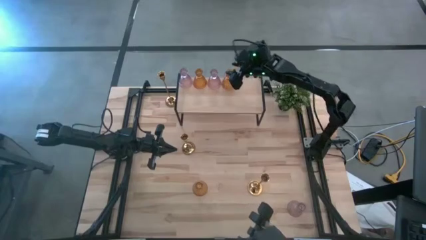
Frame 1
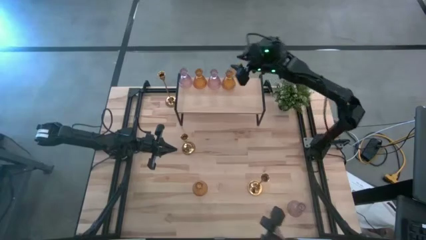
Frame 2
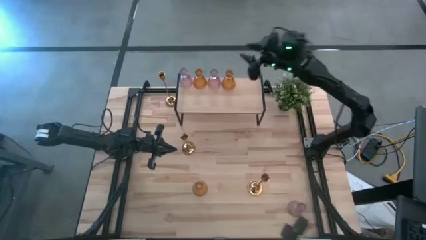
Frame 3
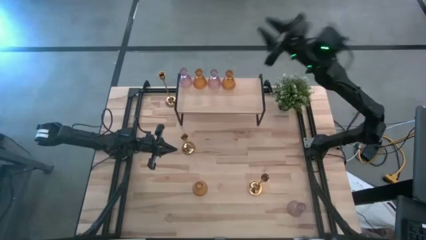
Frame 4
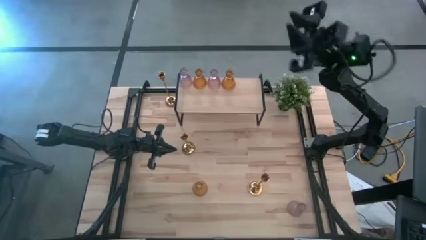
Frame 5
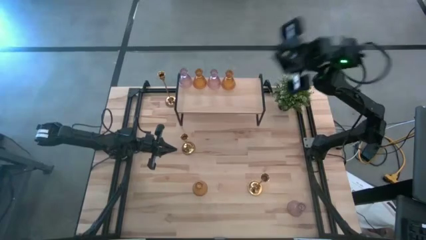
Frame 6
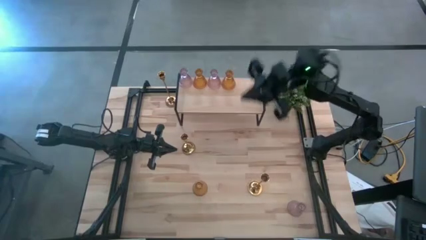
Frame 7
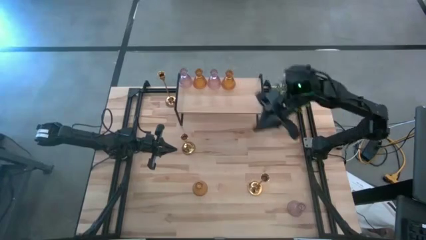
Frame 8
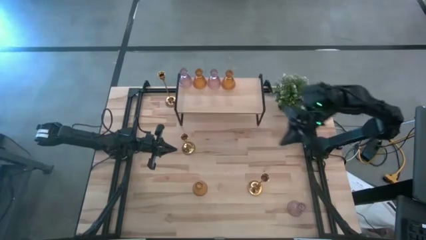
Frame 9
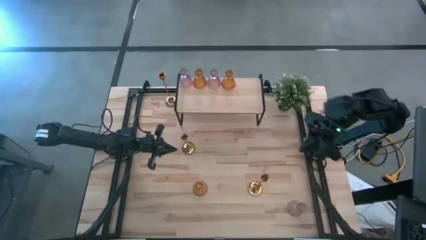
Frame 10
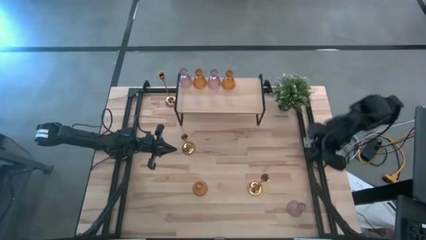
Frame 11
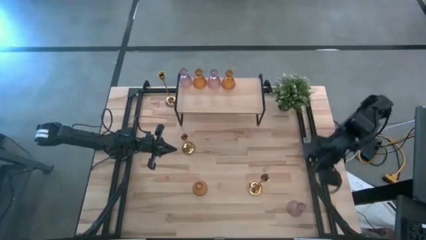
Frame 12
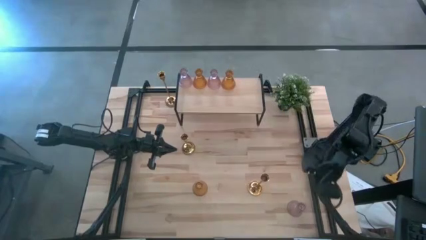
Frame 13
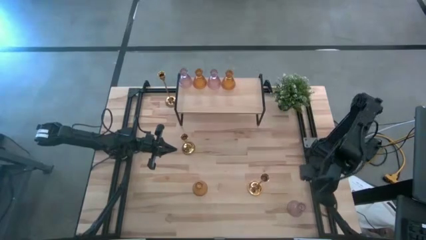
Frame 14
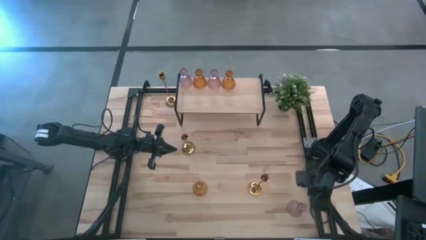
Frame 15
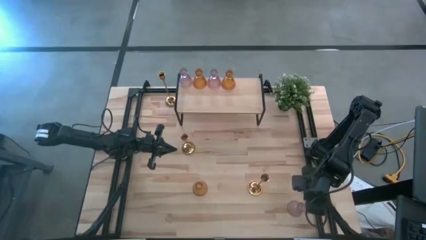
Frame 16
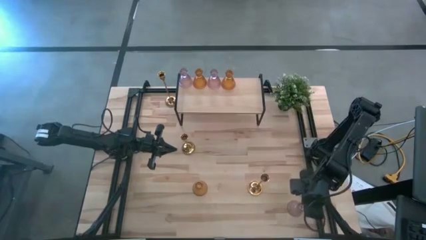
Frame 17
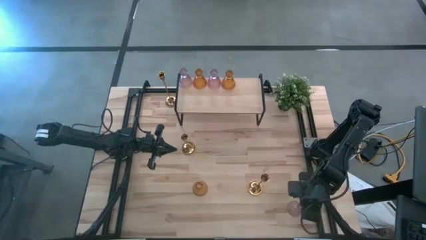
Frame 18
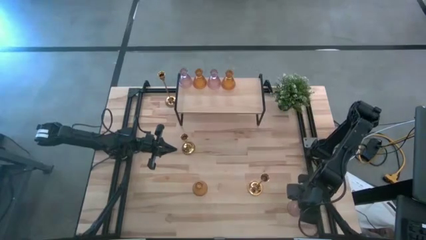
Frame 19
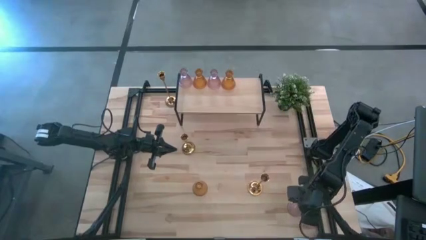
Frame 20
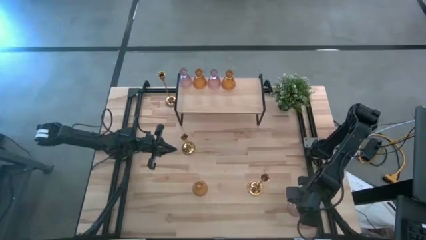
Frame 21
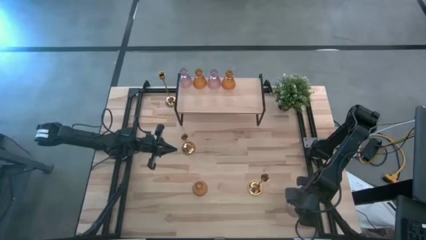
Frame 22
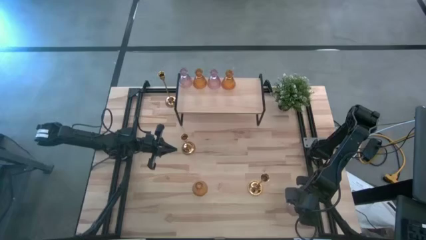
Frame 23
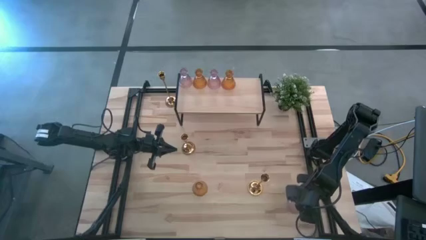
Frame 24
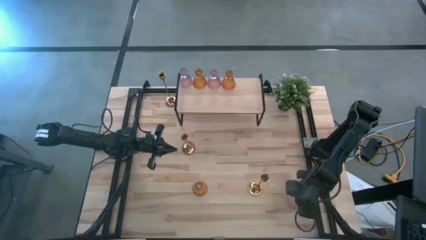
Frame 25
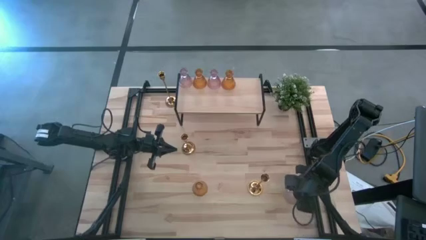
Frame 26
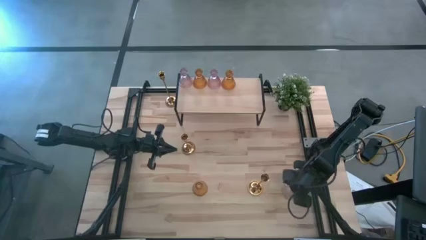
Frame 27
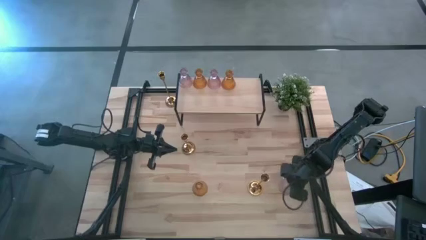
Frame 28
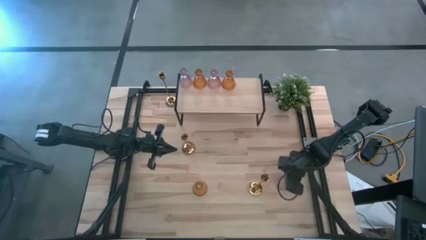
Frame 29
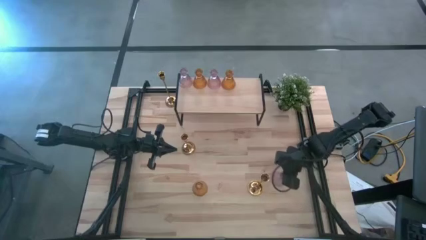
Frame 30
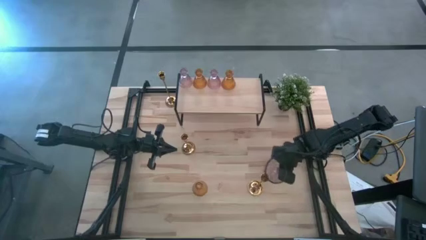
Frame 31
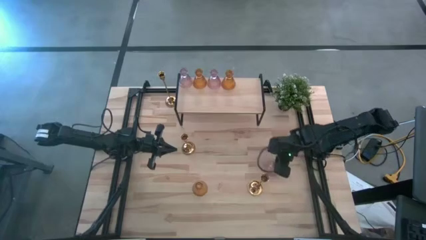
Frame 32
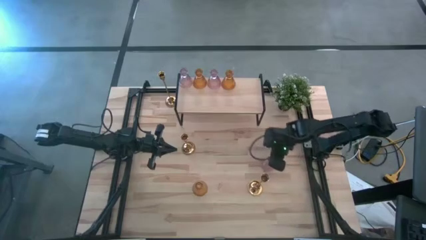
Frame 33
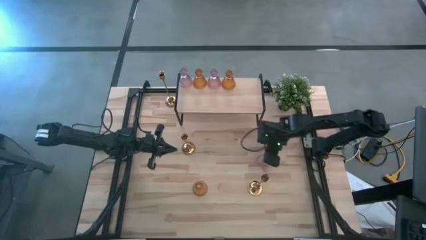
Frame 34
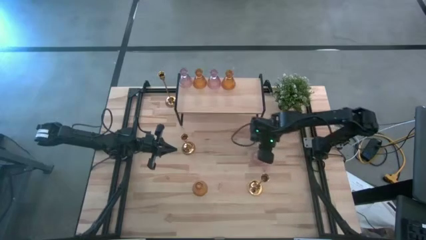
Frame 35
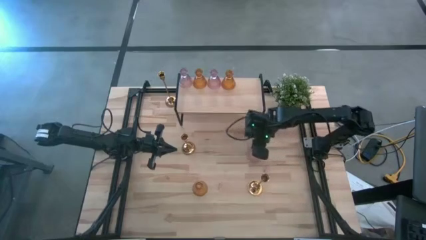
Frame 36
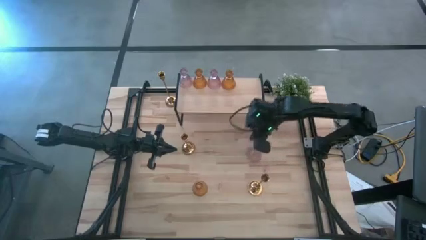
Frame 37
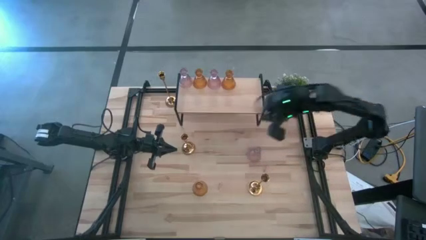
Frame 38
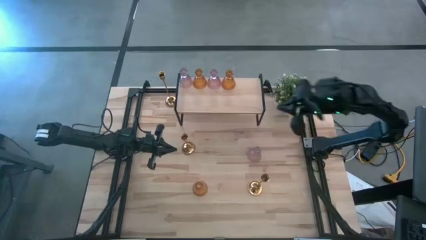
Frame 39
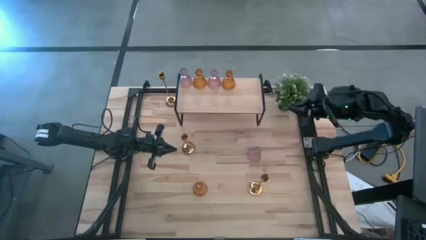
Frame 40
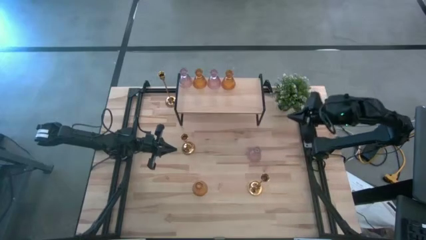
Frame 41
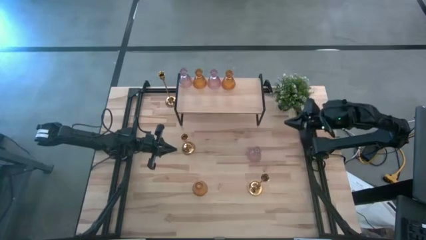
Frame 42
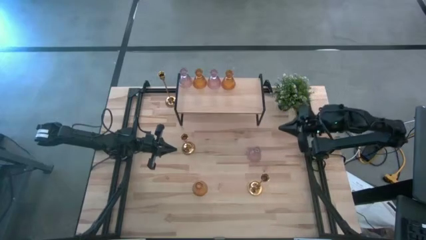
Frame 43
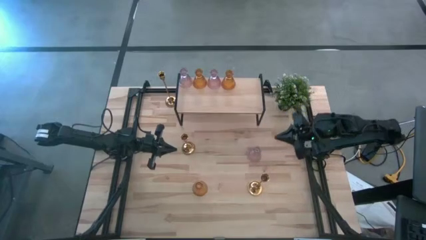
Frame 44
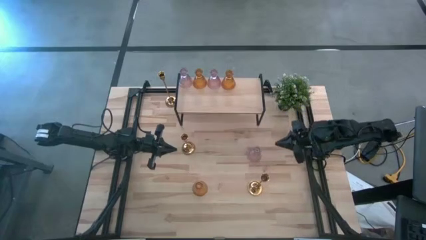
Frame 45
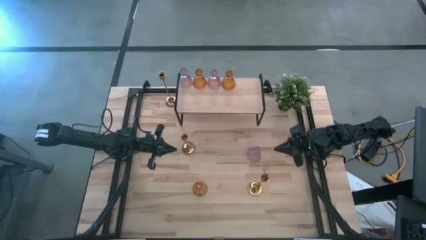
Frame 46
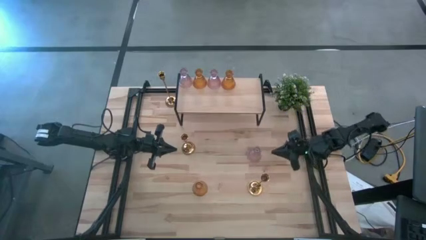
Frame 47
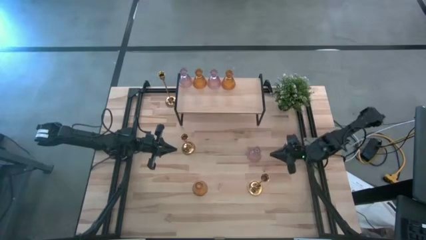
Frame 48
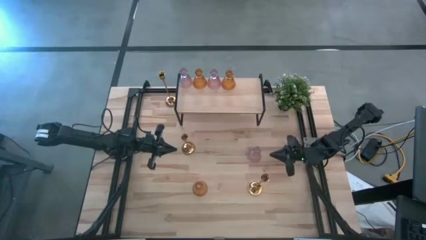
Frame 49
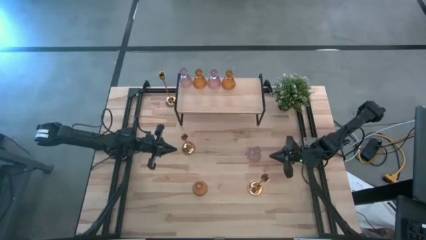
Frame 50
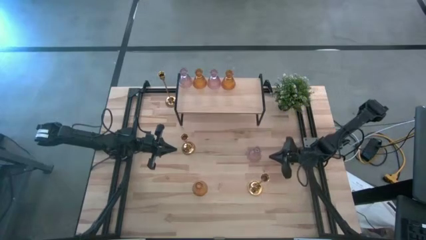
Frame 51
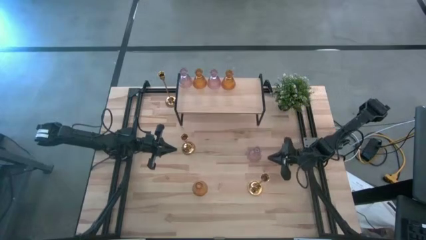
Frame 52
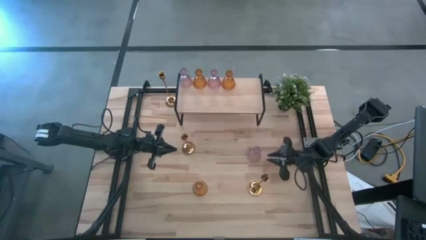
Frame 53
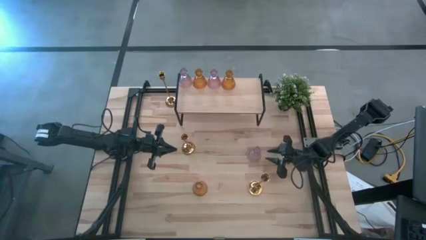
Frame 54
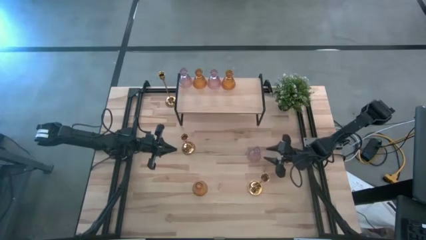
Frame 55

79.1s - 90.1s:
Task: Pick & Place candle stick holders
Put the purple glass candle holder on the shelf aligned with the other glass candle holders

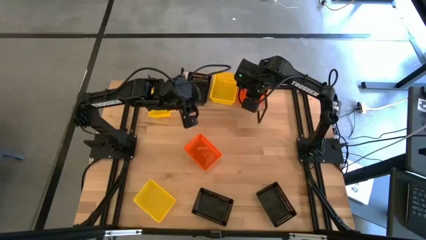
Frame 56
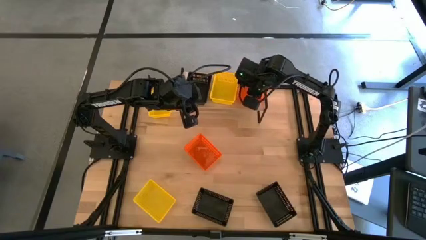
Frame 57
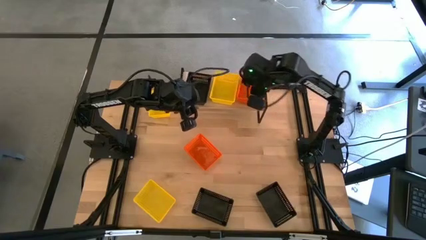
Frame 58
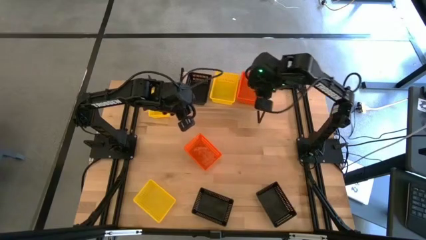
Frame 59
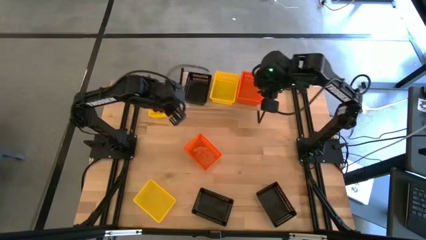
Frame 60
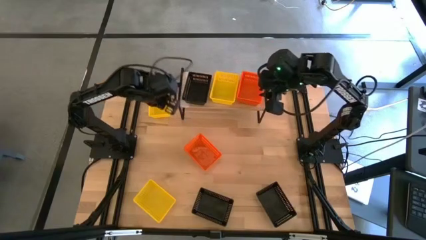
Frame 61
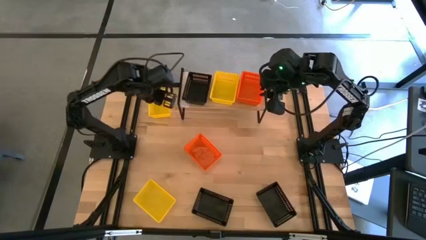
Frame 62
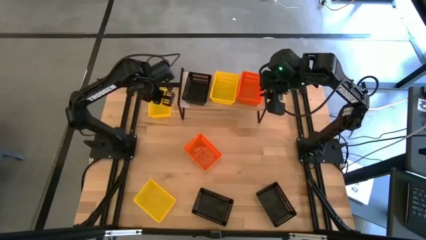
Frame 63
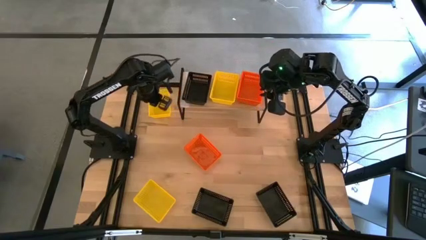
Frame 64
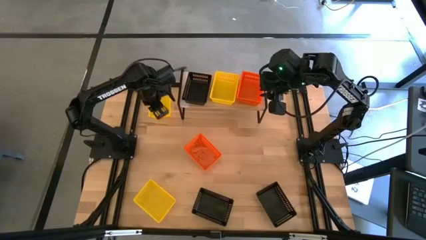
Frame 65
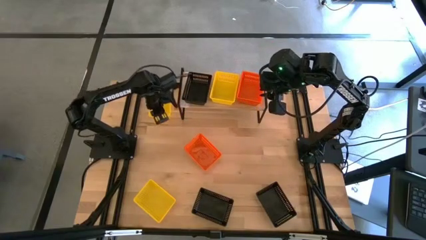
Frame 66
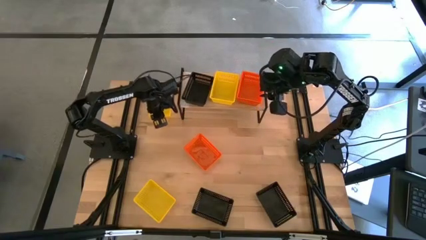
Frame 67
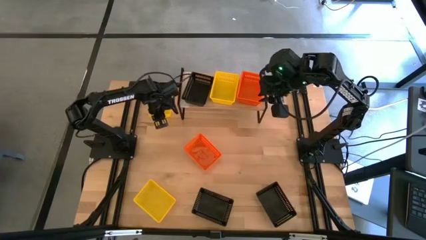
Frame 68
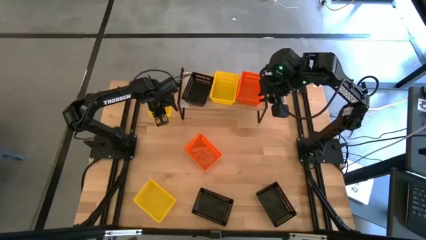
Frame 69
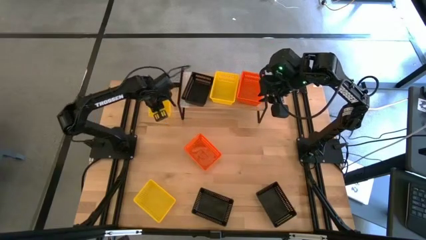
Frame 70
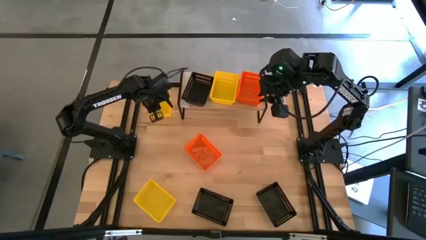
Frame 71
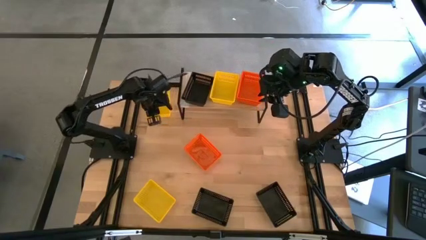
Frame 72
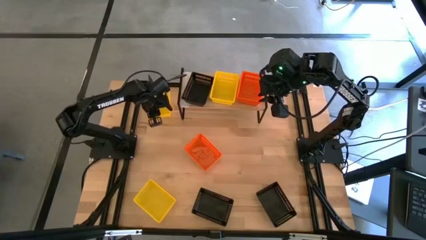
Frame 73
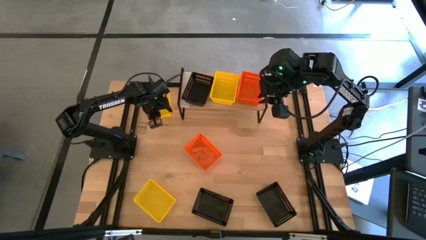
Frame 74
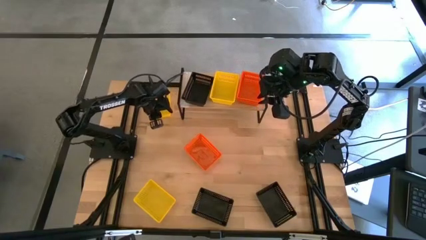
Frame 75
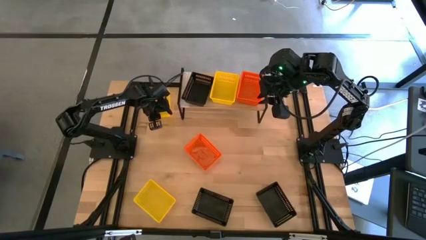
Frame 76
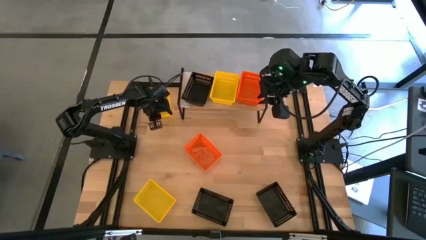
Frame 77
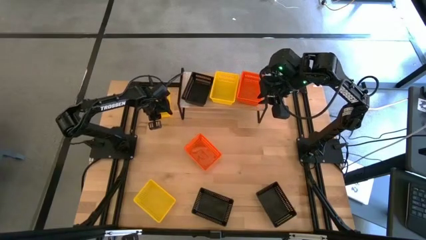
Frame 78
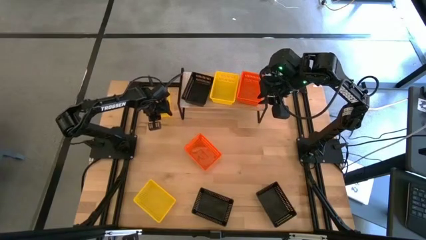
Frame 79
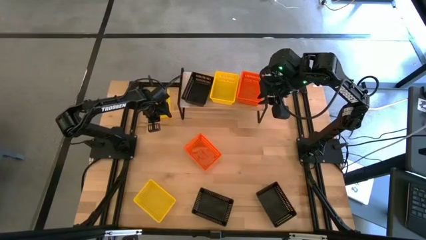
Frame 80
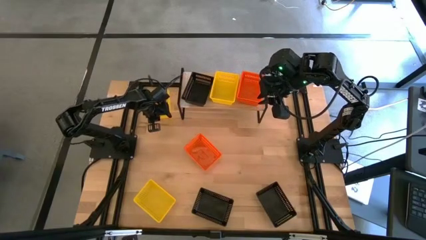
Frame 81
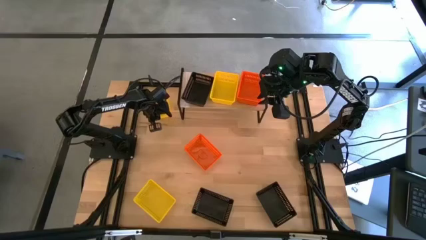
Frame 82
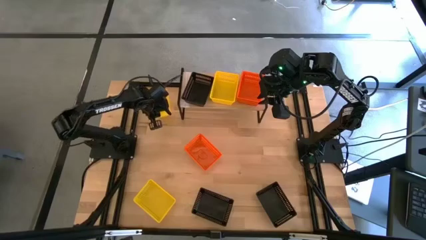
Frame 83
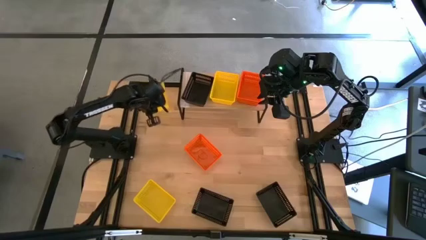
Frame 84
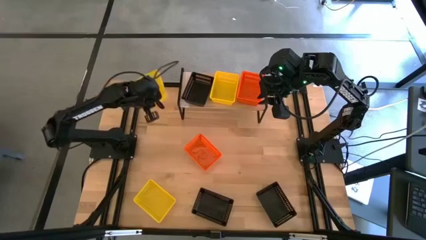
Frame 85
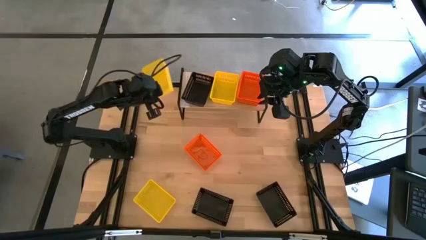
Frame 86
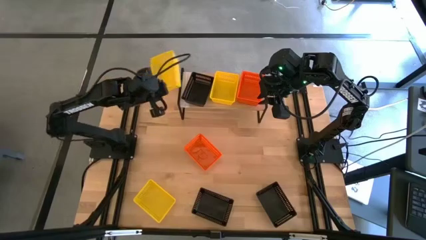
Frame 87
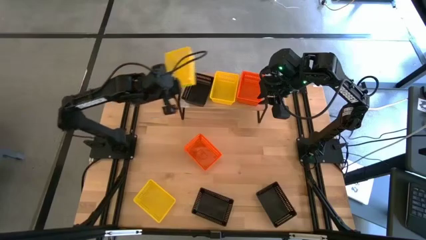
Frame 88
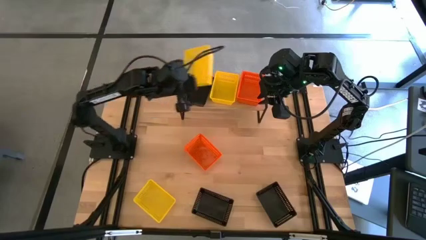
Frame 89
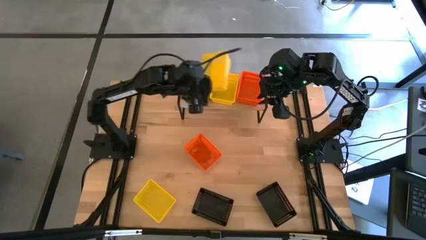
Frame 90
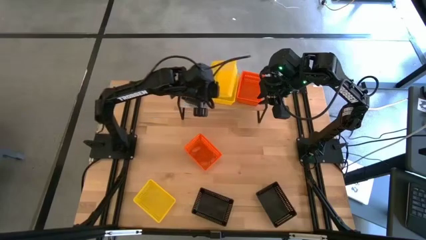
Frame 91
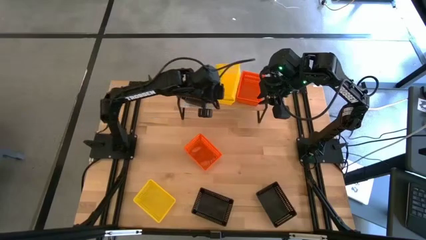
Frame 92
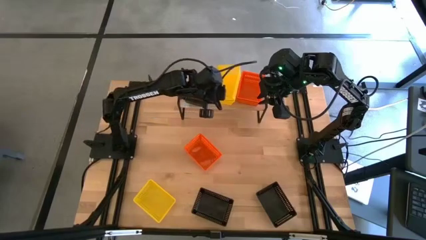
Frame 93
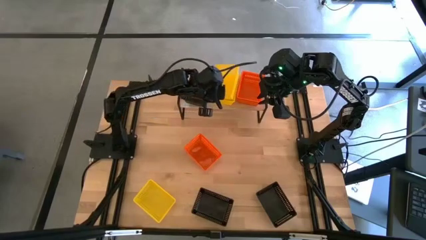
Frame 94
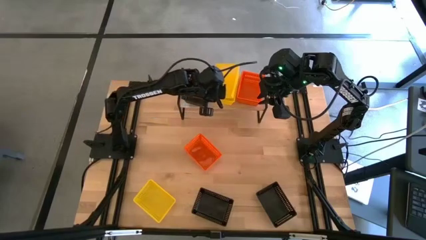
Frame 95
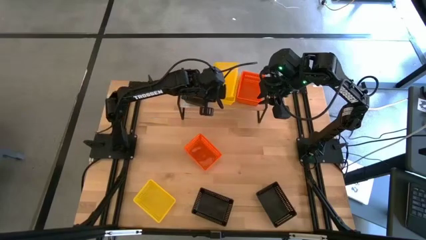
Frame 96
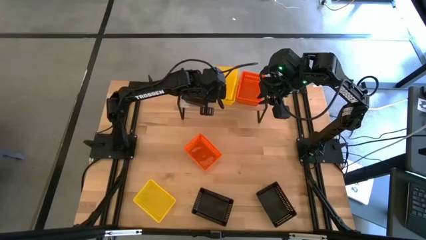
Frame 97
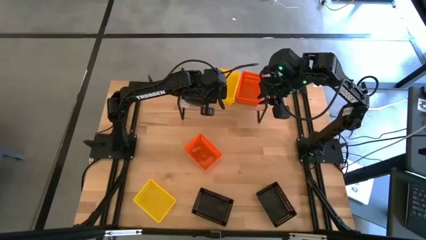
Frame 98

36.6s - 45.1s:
Task: Stack baskets on shelf by color
Stack the top yellow basket on the yellow basket on the shelf
